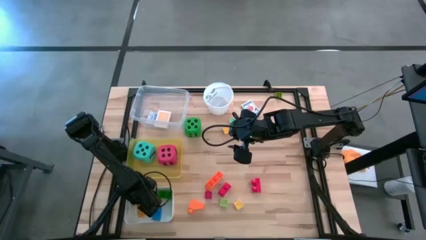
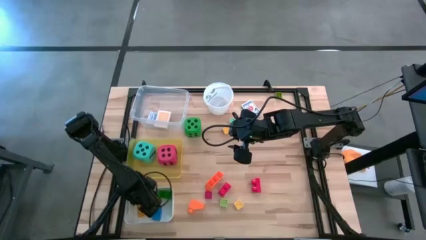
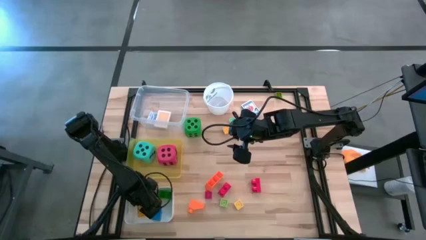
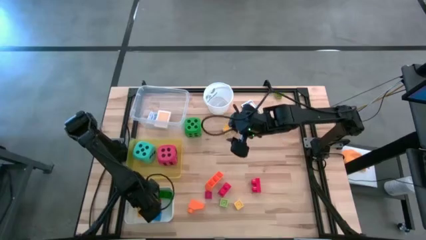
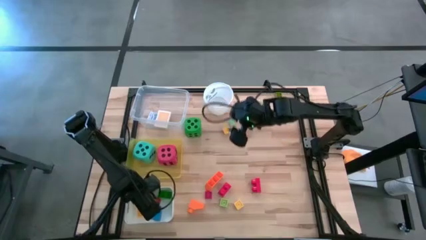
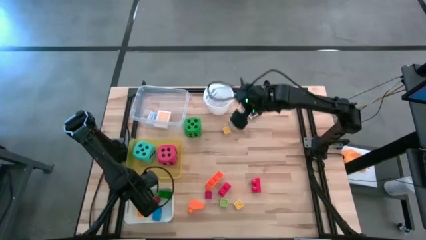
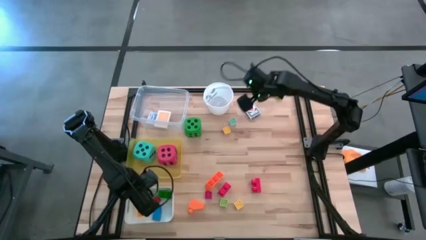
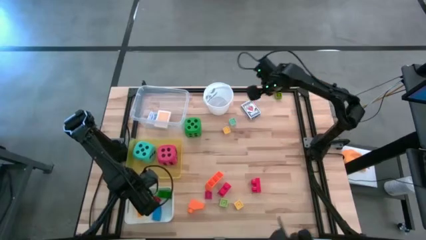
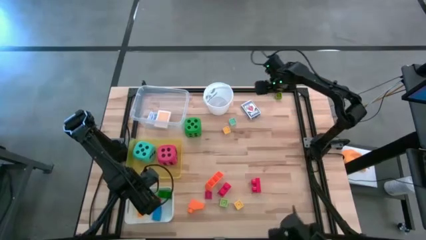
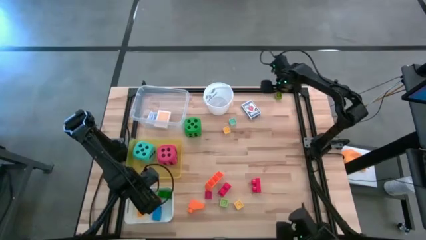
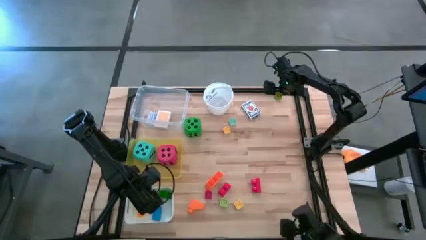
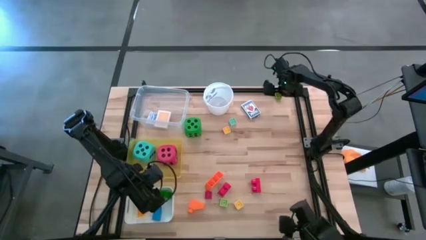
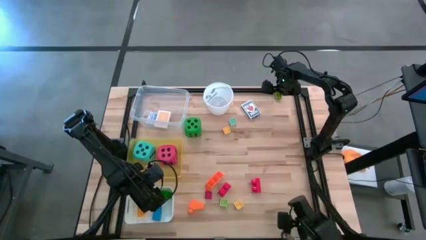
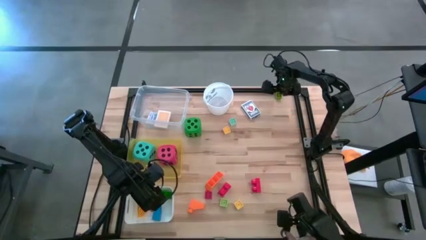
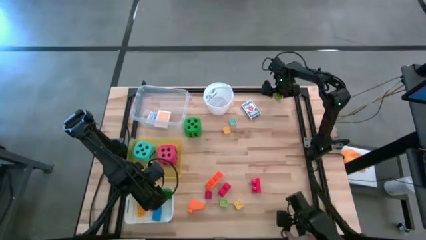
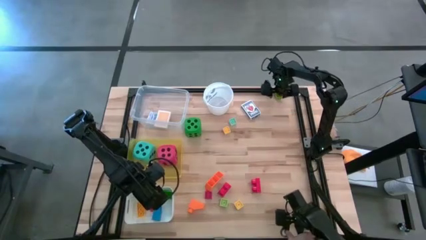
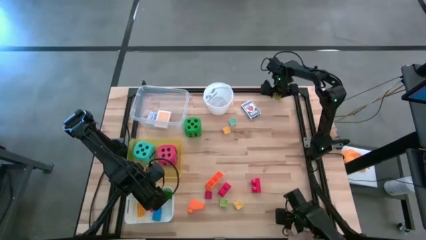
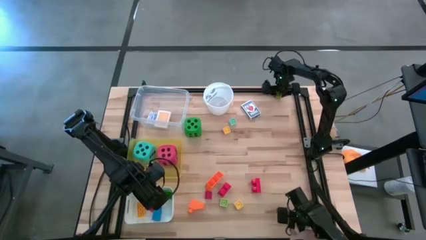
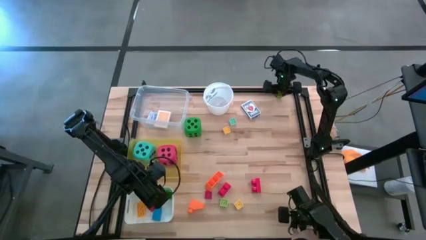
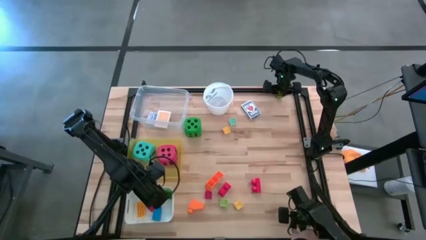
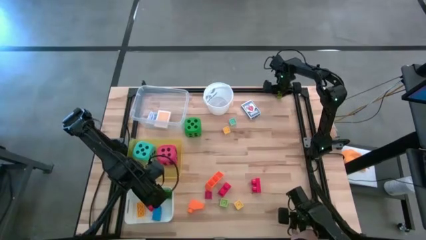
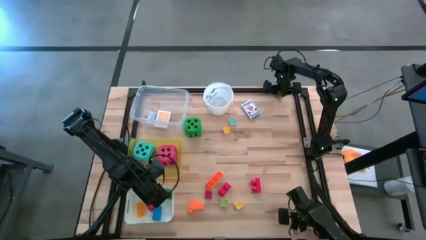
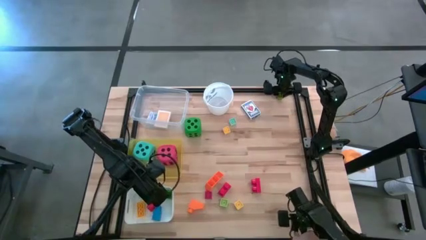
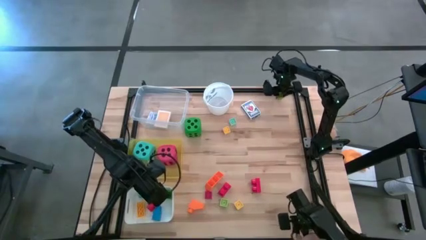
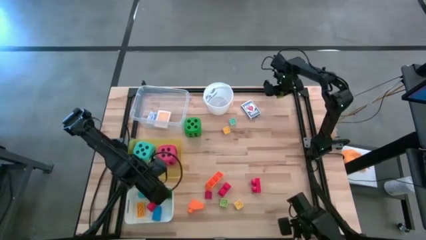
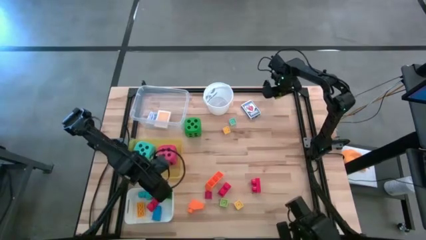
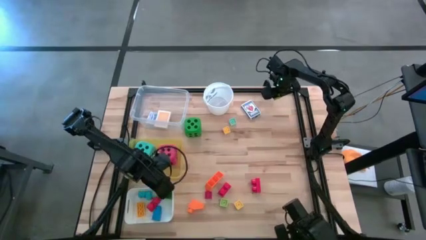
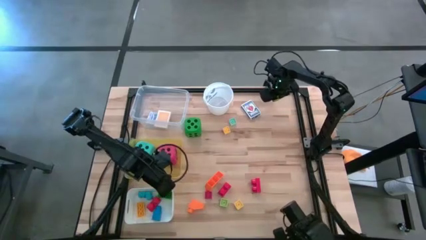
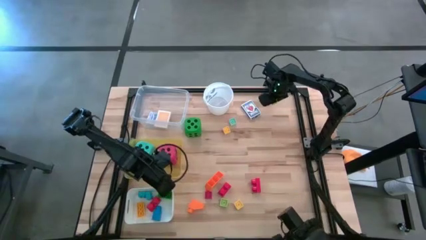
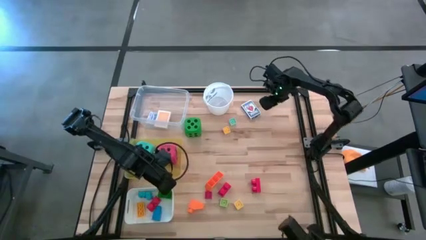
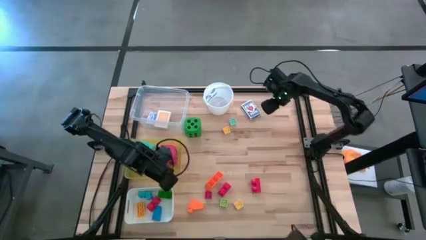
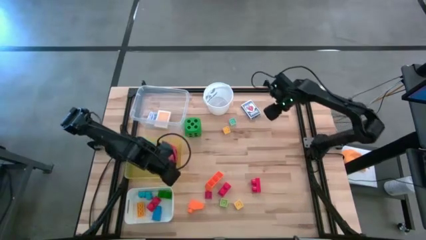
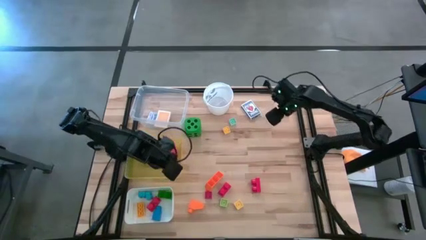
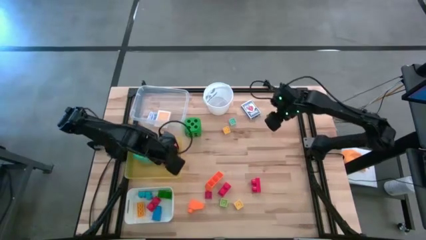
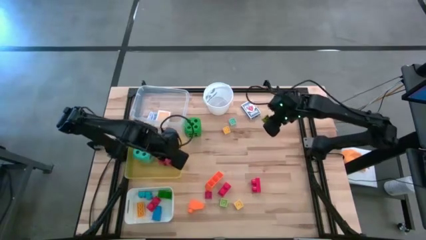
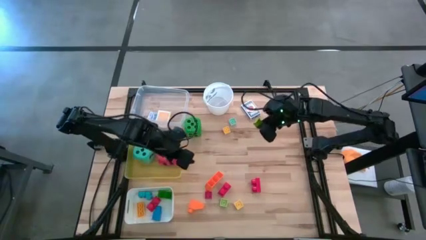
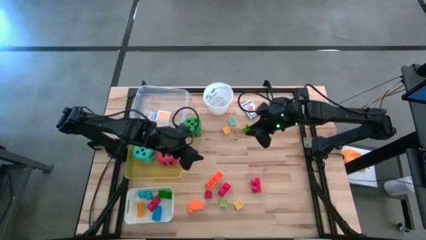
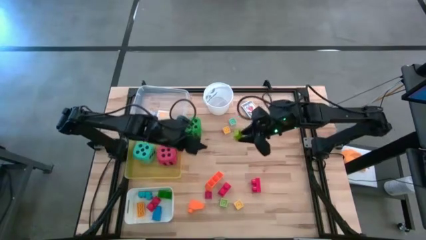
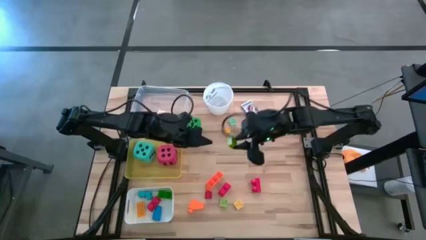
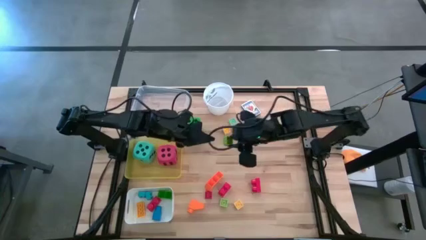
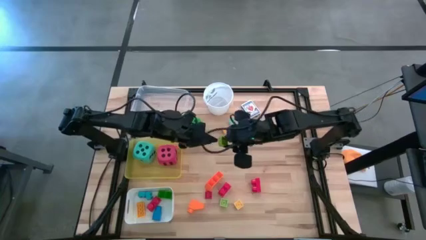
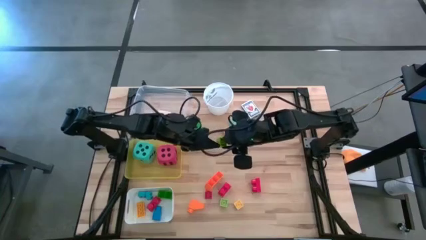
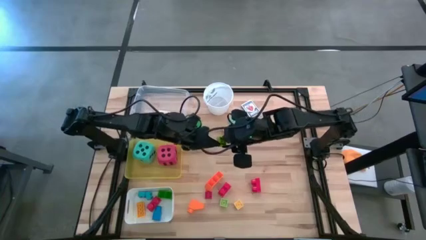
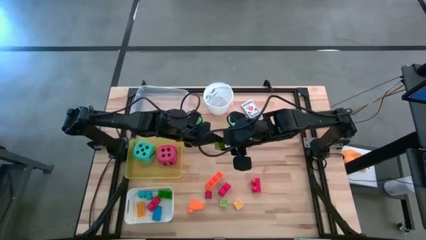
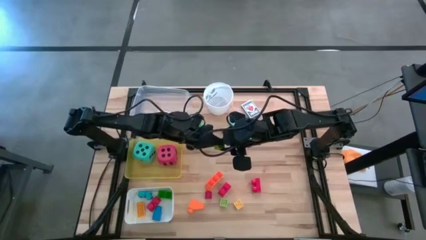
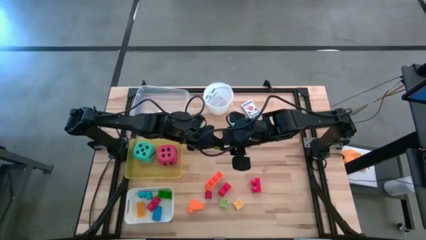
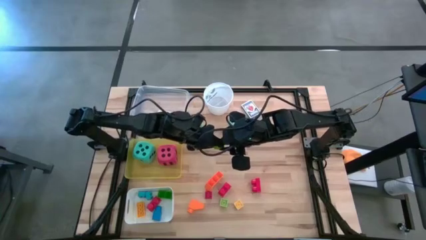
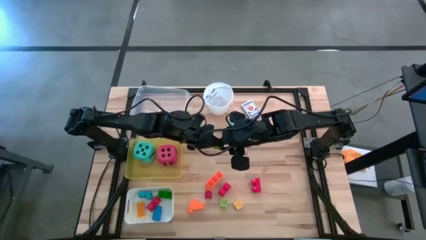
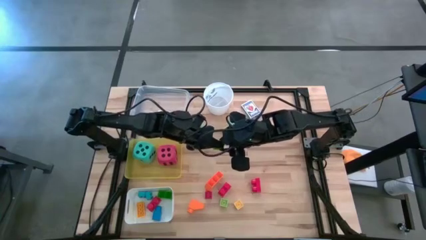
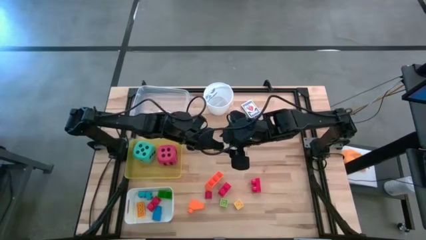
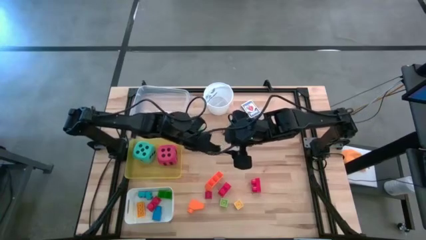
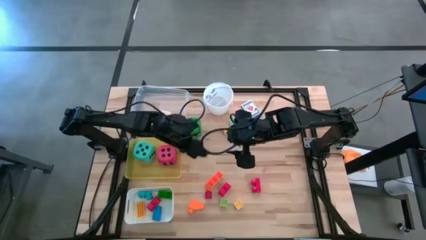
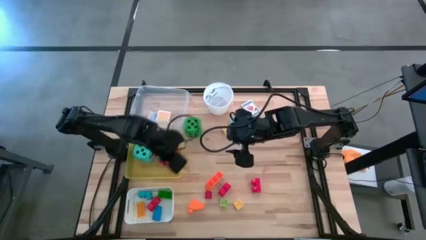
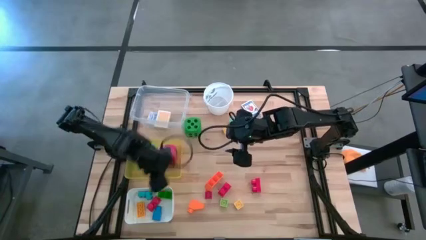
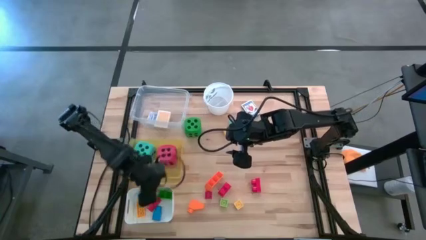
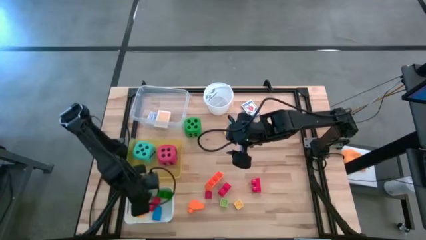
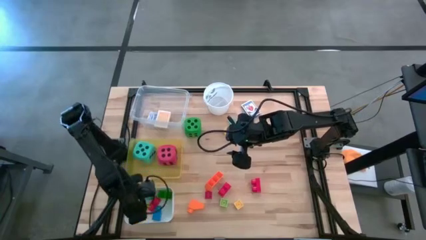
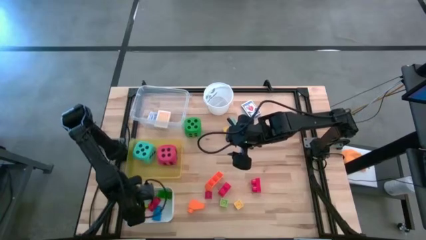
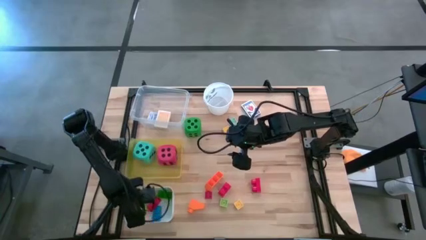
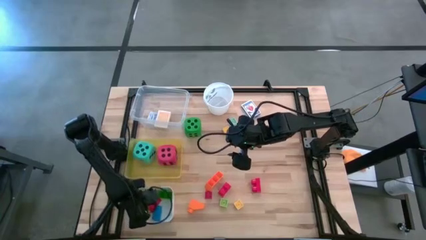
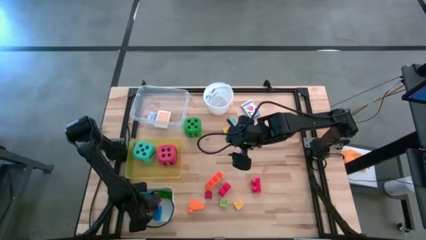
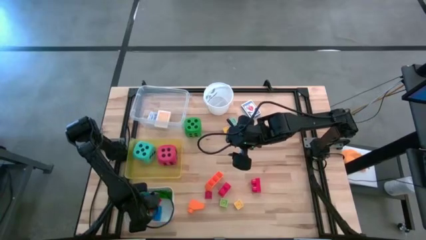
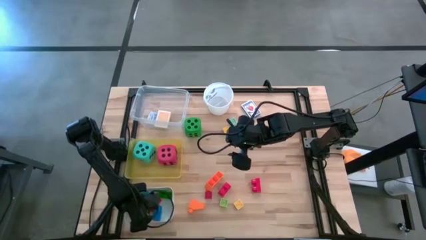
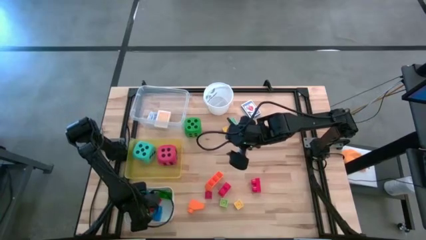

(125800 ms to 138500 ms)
Task: Pick & Place Toys
Put the dark green game piece into the white bin

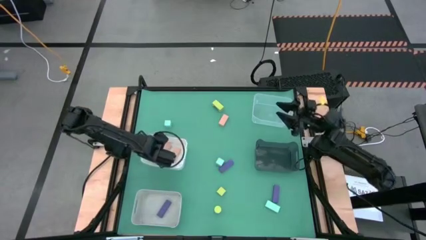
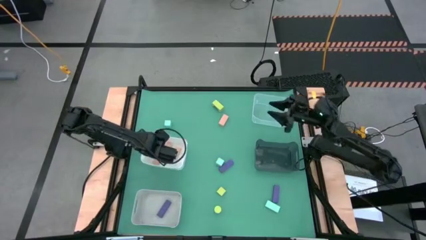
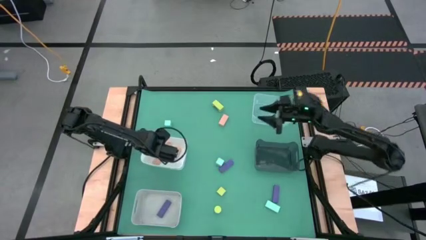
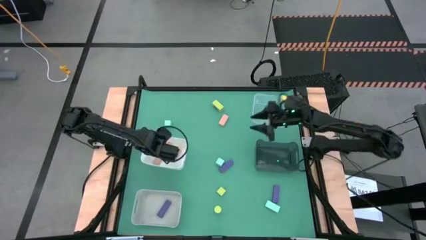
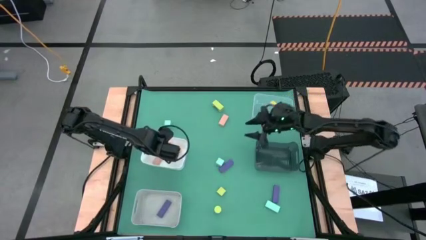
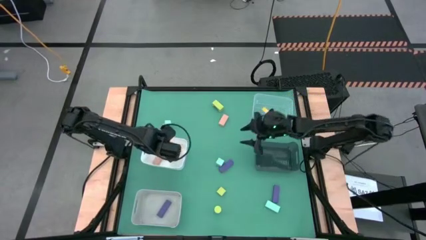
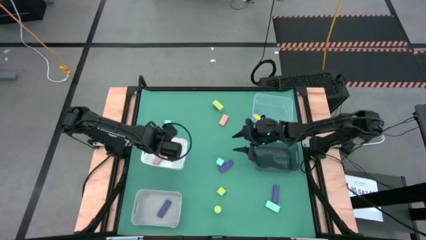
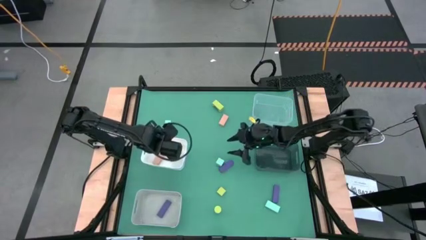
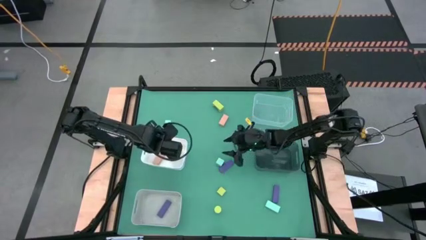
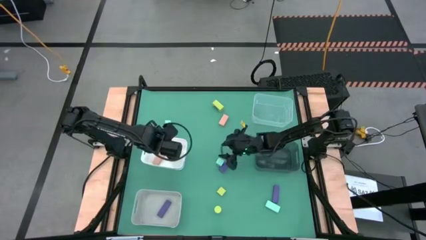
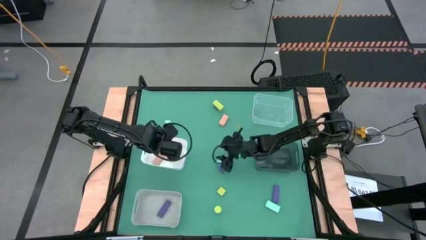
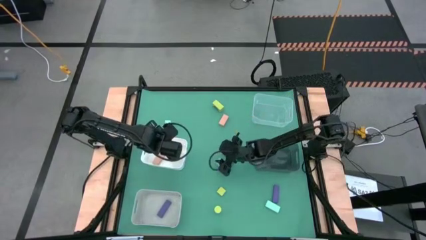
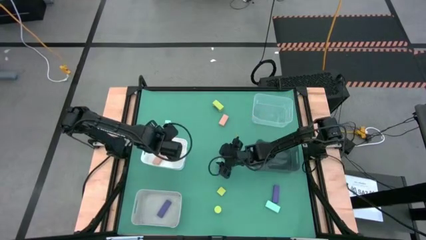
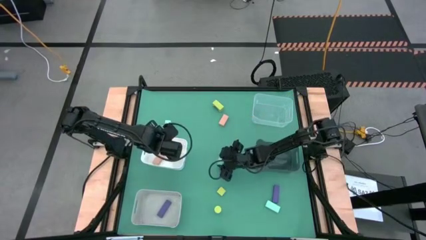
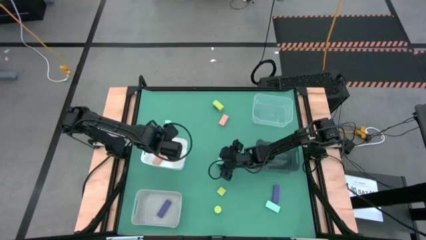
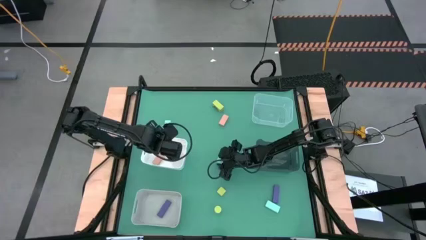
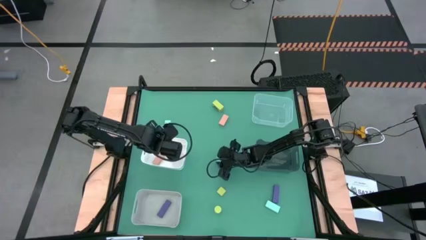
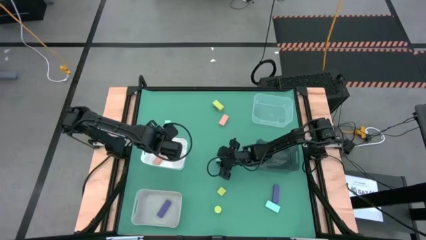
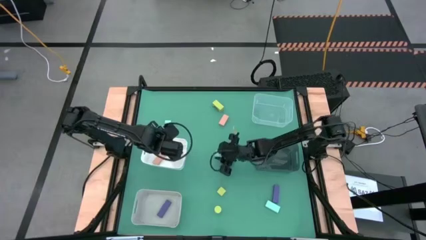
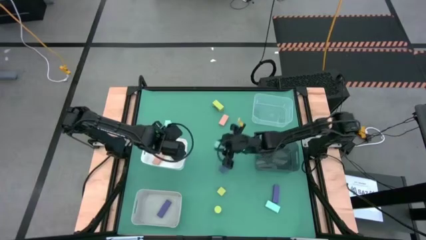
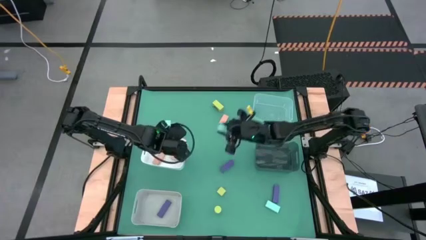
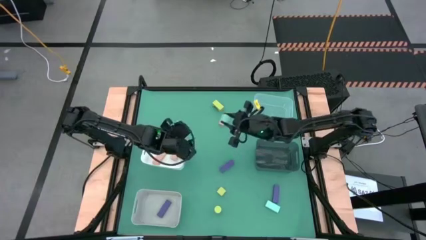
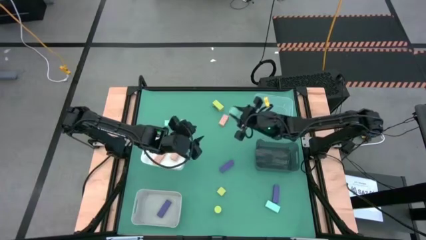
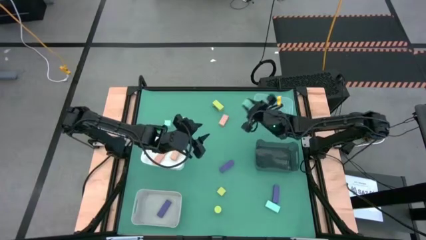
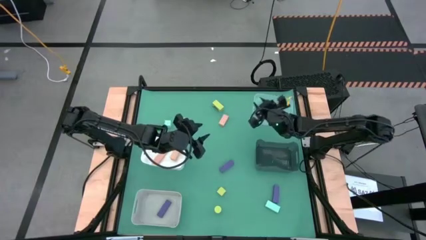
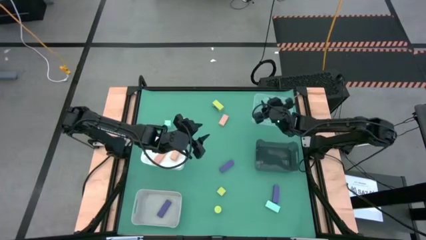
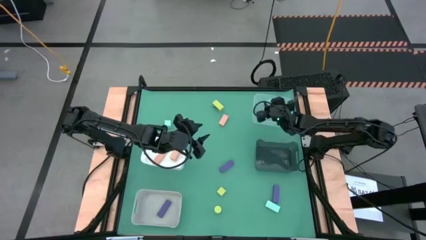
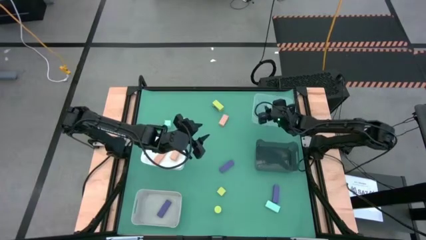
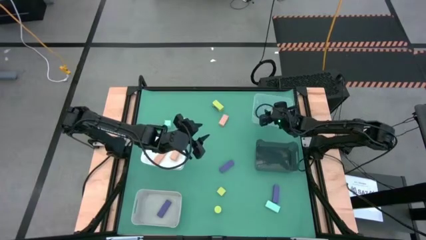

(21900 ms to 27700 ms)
Task: Sort & place blocks by color
Put the middle blue block into the transparent bin
